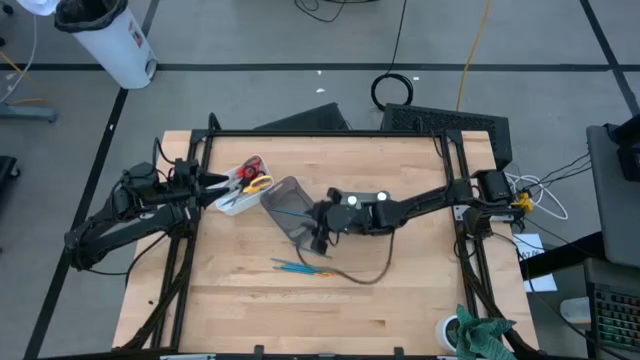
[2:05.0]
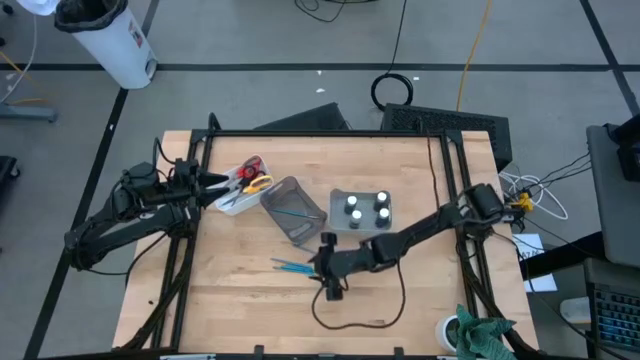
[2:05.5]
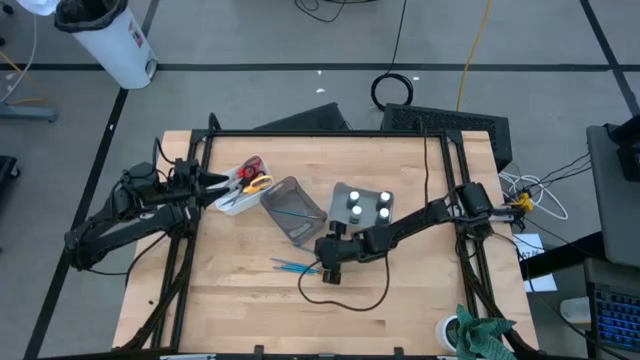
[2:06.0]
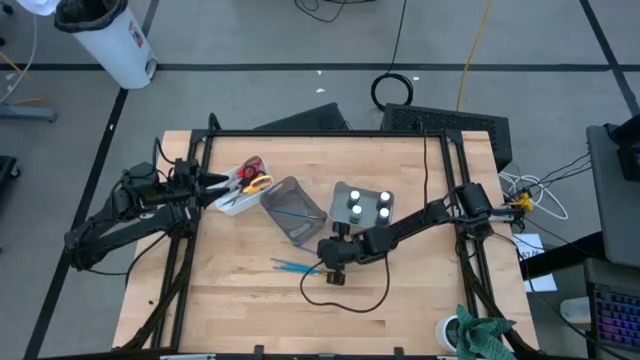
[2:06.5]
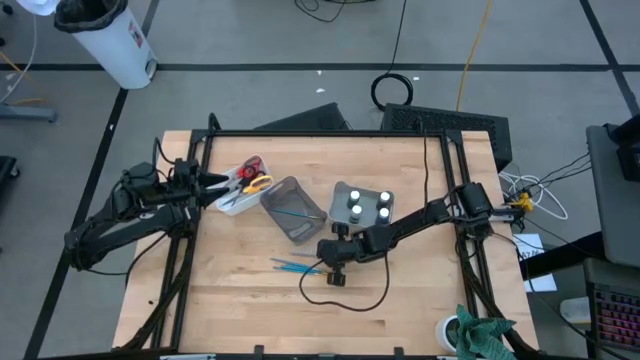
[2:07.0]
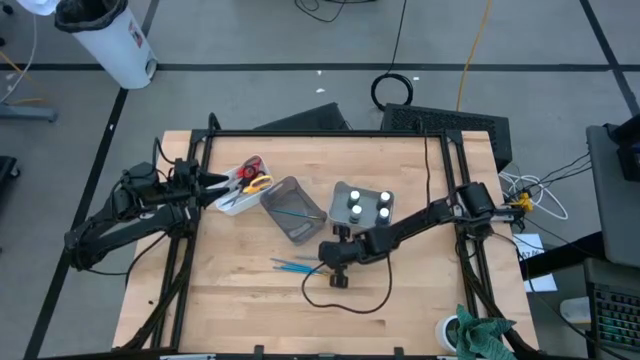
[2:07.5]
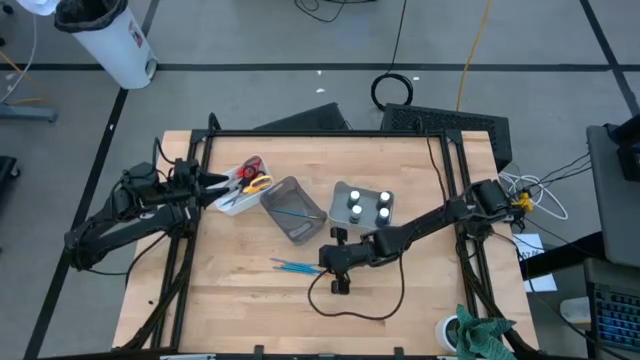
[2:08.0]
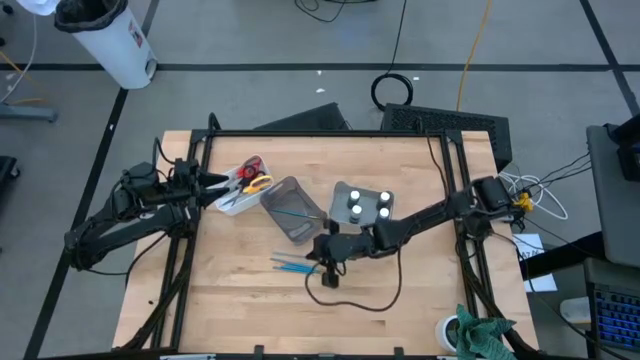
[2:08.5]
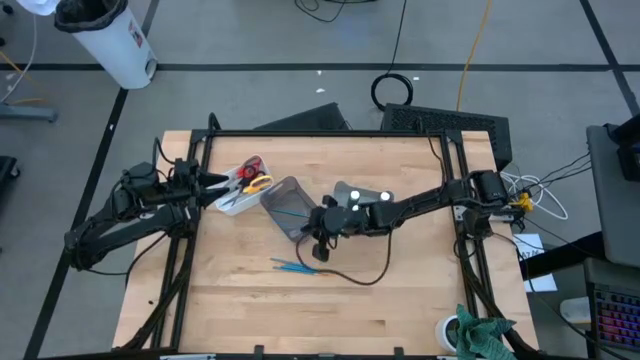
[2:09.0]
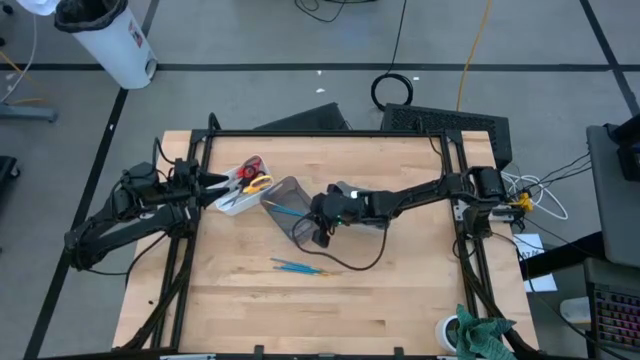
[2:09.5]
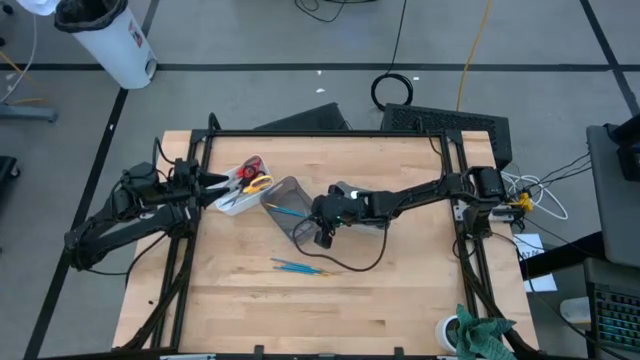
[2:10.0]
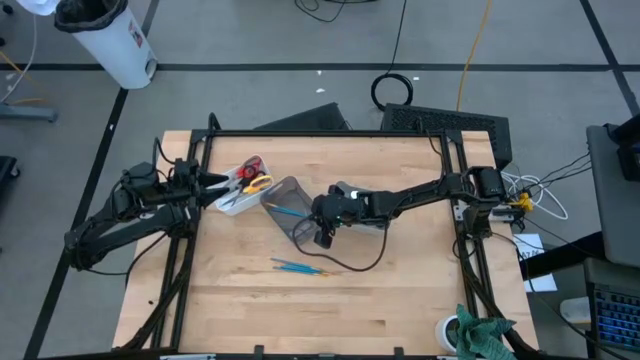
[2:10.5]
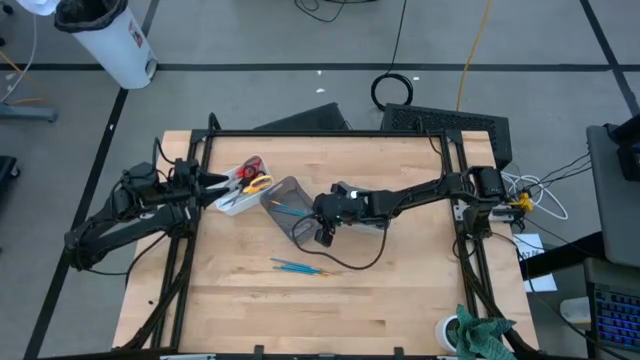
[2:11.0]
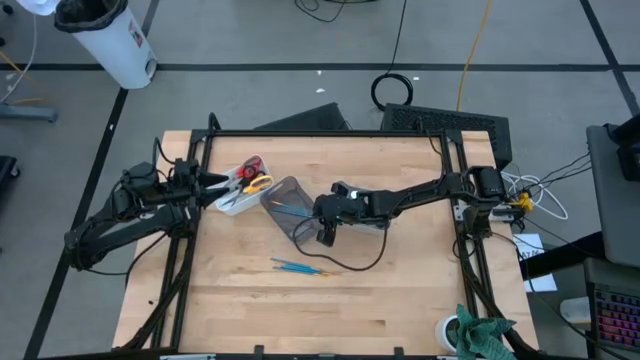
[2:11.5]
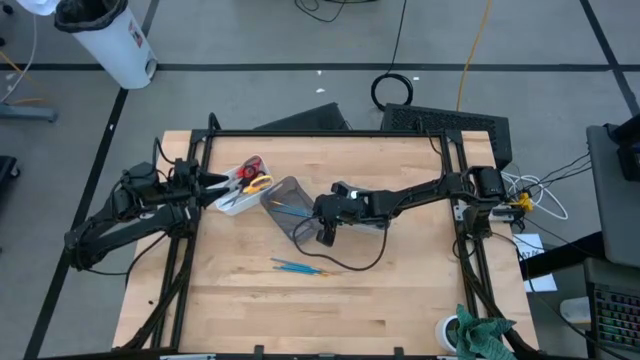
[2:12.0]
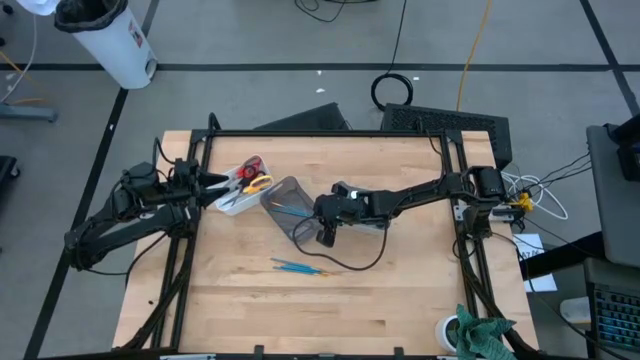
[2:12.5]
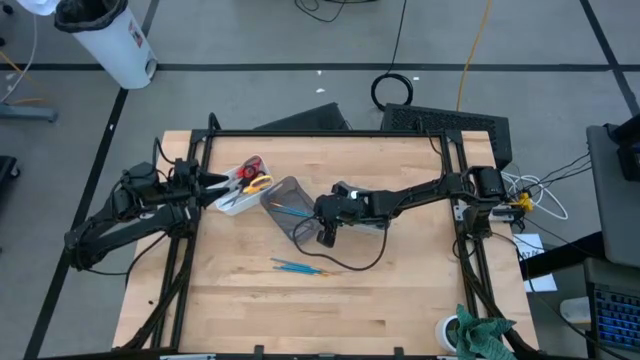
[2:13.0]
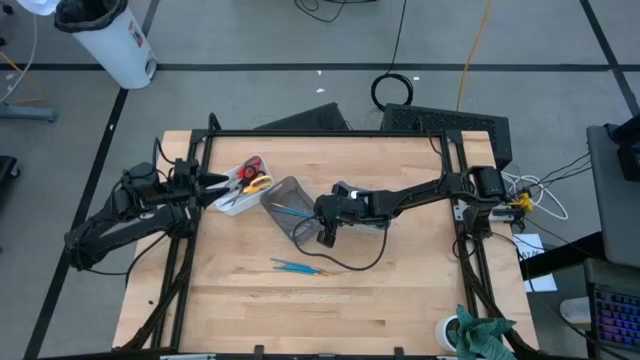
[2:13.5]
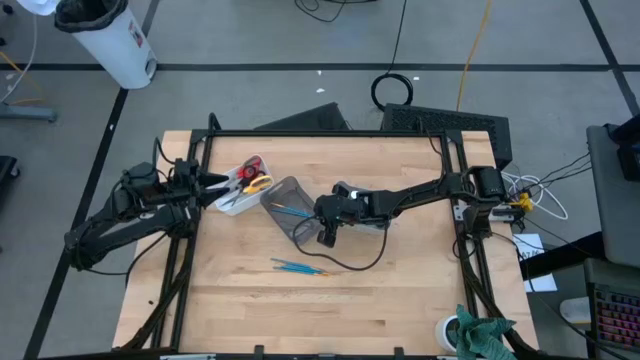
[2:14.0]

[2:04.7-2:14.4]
Task: Pick & Place Paint Supplies
Put the blue paintbrush into the black bin

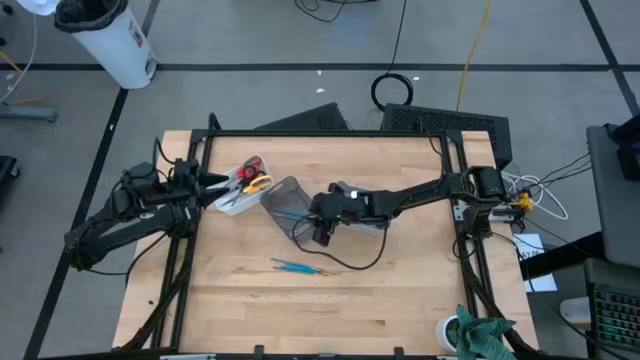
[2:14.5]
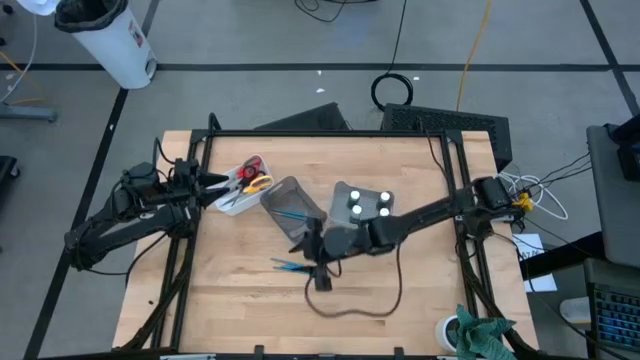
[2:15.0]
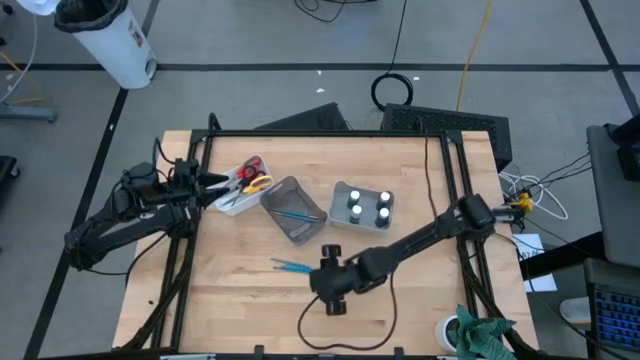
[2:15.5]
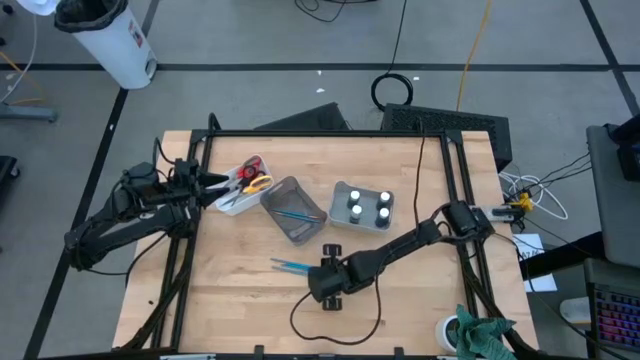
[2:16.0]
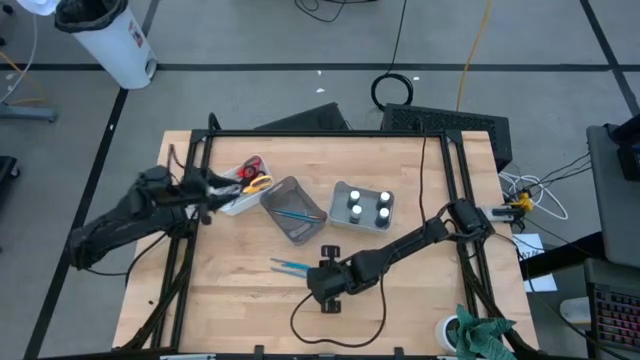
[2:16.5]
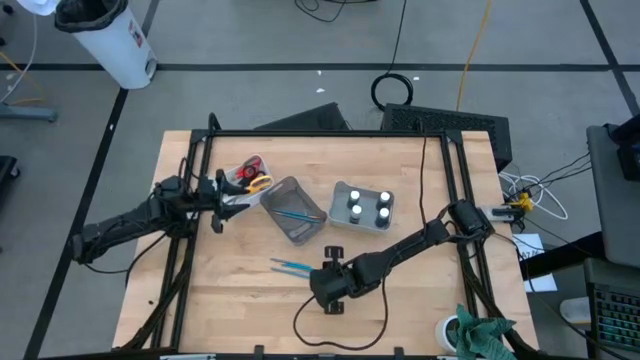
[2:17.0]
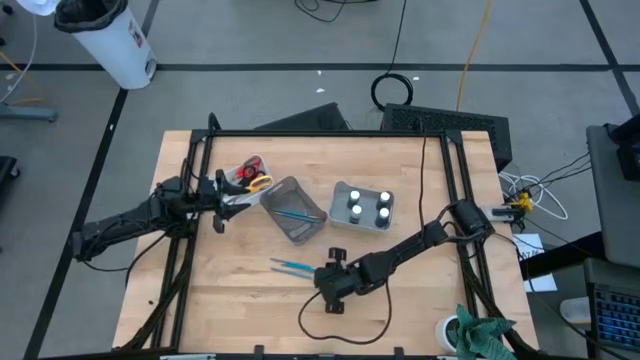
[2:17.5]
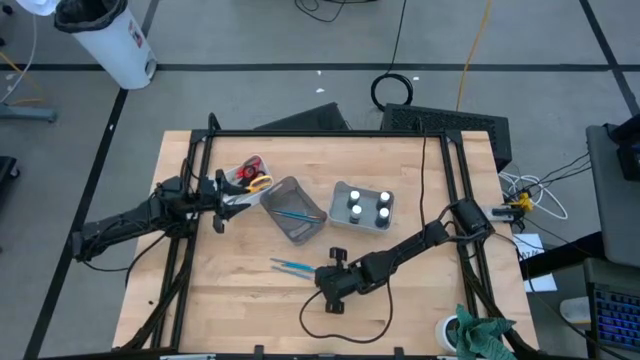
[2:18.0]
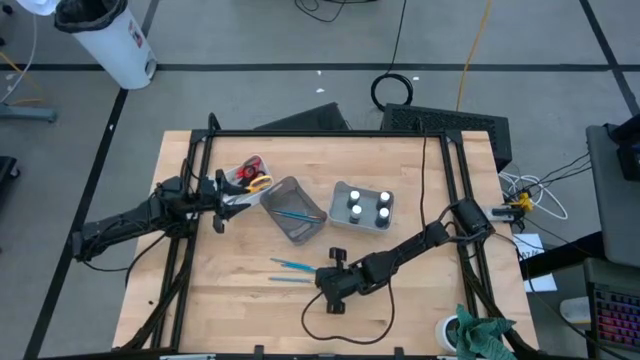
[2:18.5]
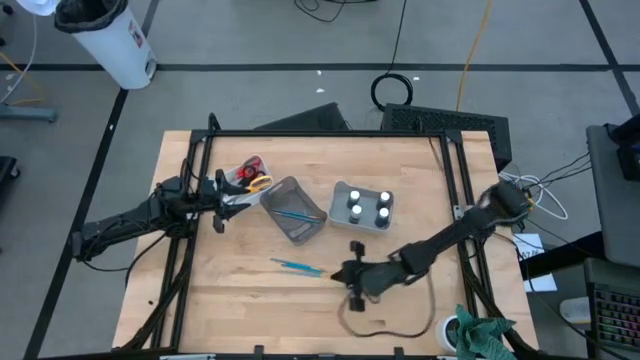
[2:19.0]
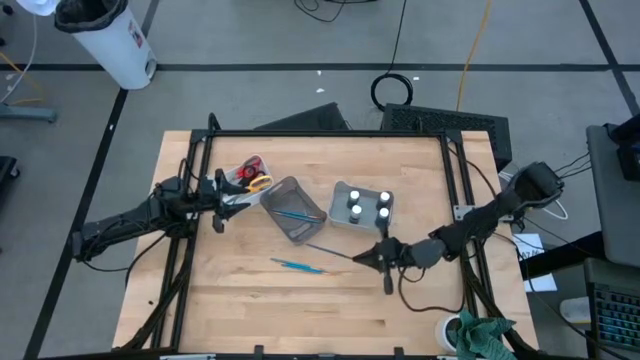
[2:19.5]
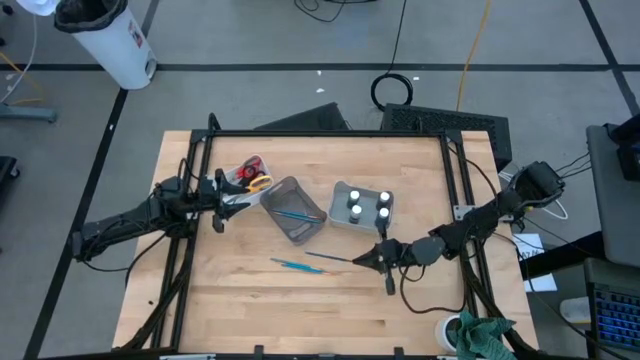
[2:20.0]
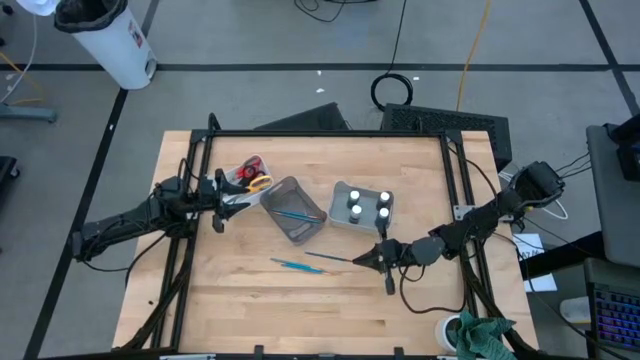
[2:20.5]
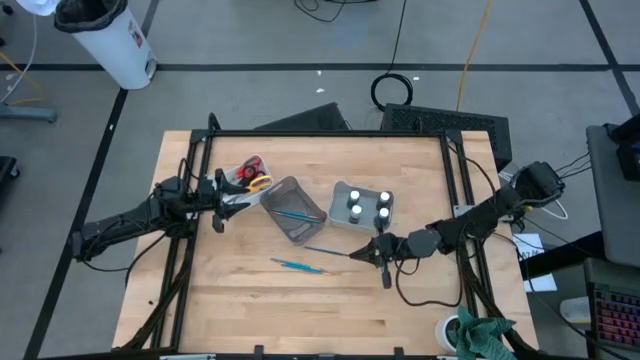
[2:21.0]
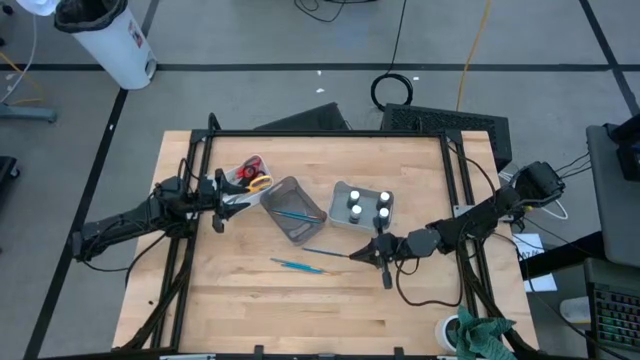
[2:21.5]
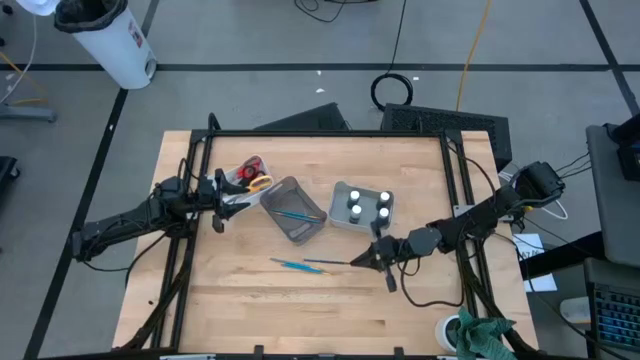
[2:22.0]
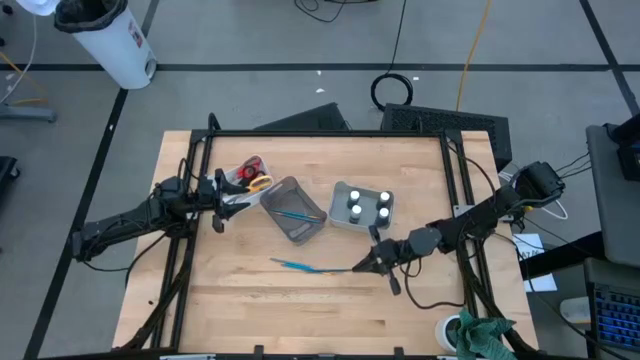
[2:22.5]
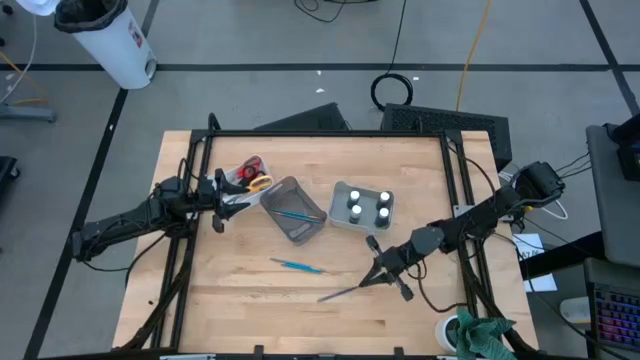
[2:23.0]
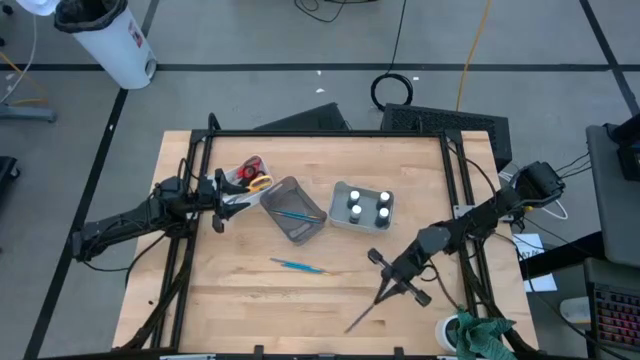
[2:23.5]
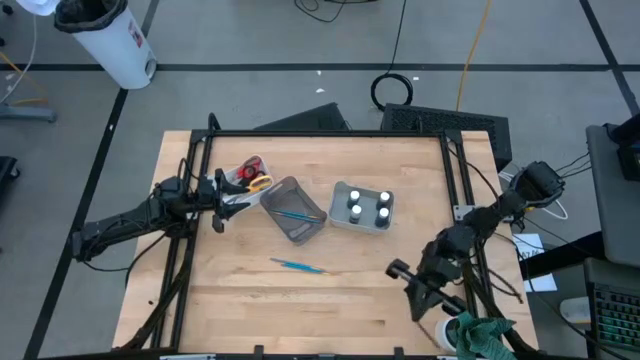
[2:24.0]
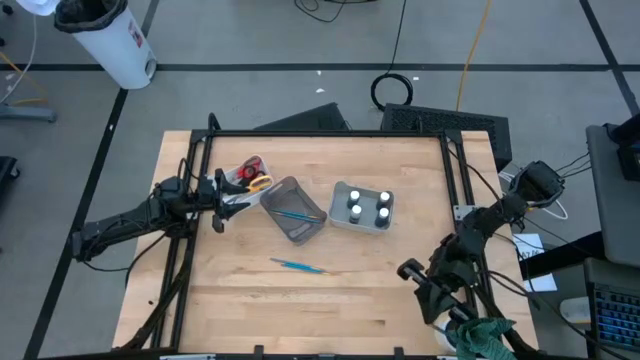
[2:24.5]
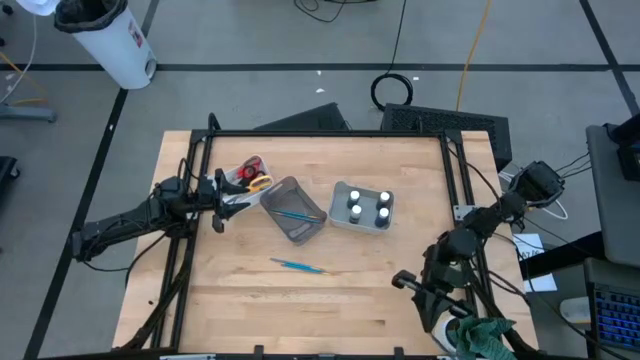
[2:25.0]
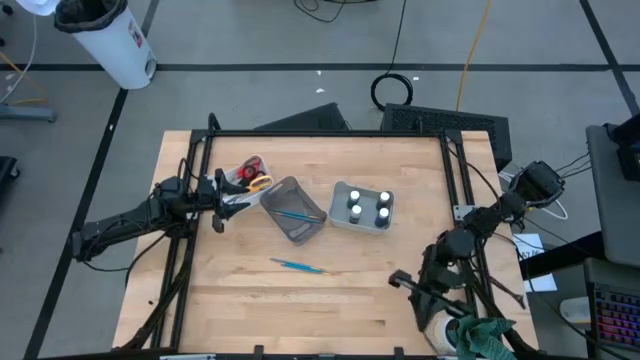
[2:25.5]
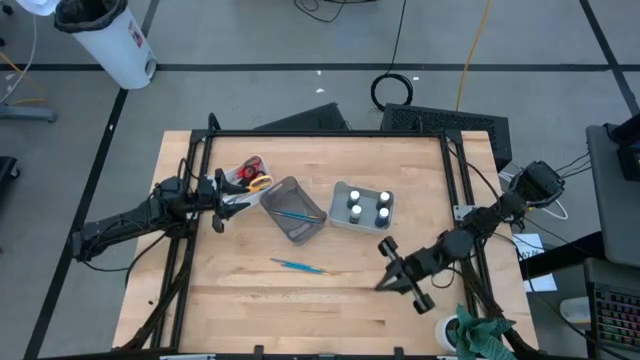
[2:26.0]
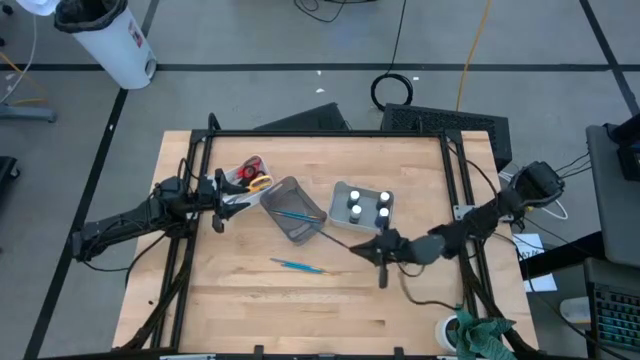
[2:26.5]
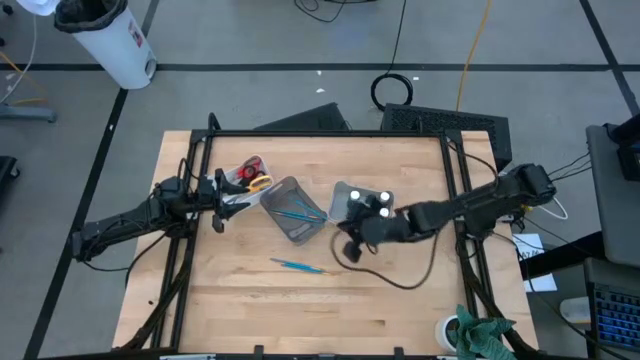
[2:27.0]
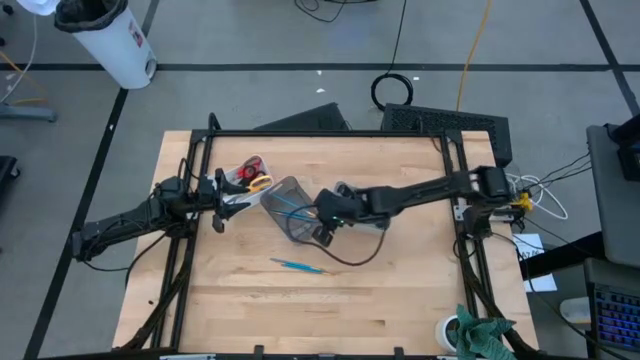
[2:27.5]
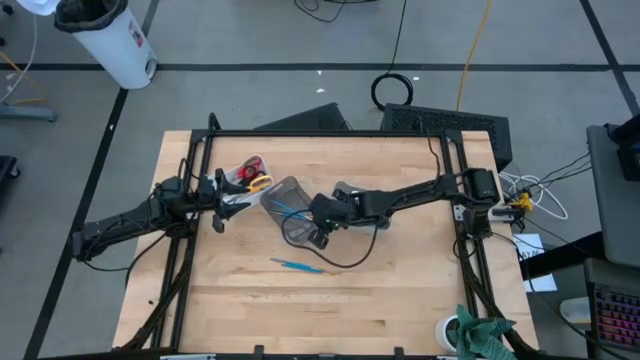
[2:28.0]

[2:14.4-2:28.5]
Put the blue paintbrush into the black bin
